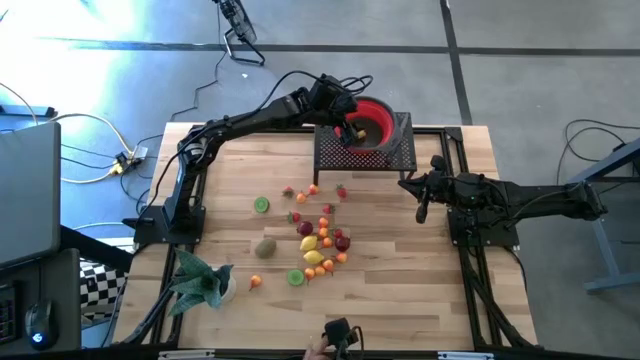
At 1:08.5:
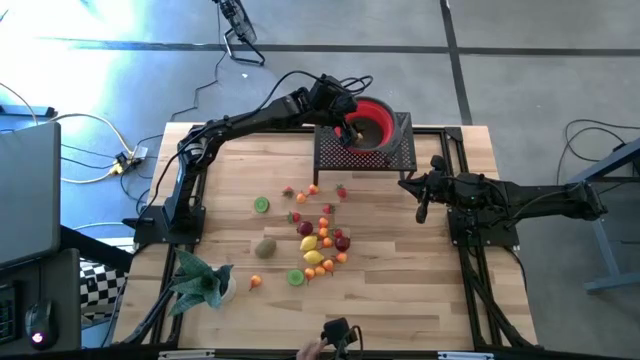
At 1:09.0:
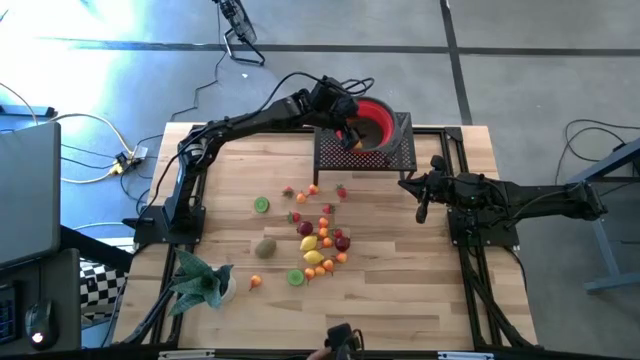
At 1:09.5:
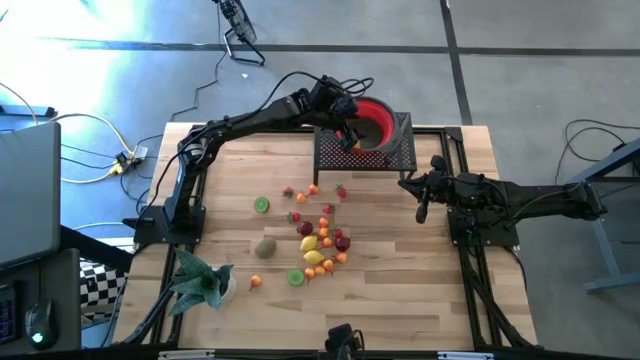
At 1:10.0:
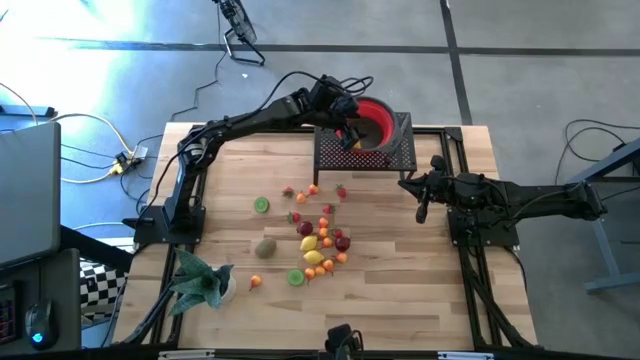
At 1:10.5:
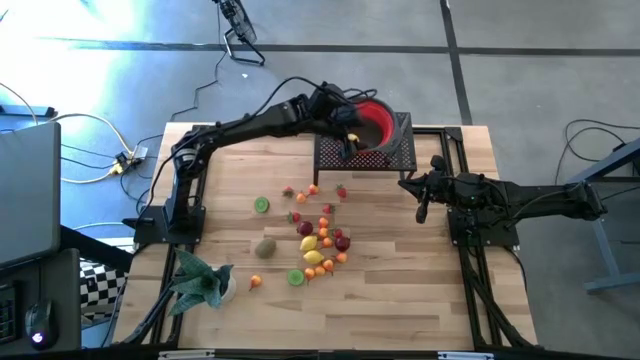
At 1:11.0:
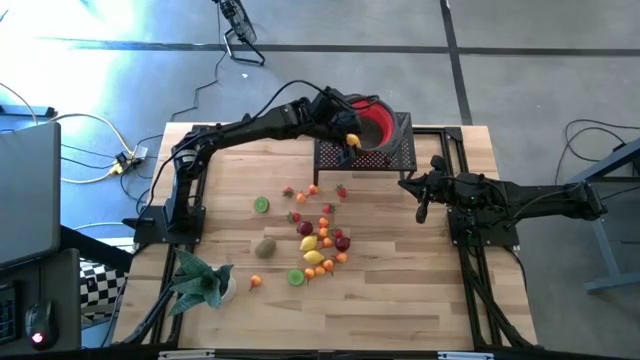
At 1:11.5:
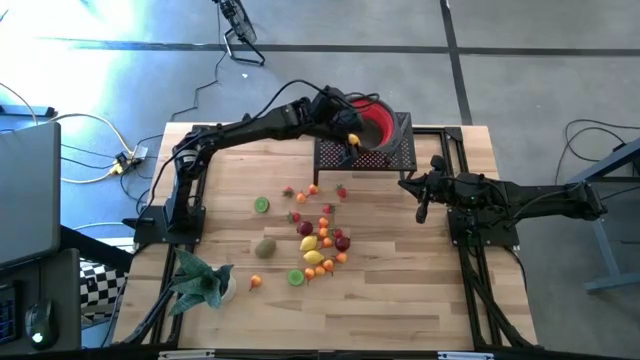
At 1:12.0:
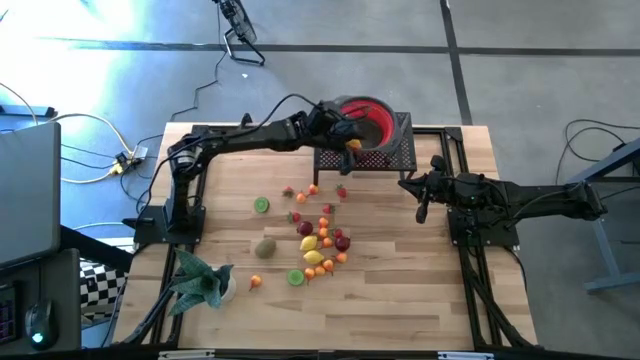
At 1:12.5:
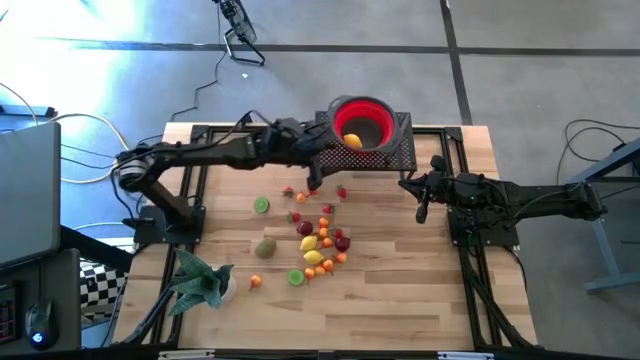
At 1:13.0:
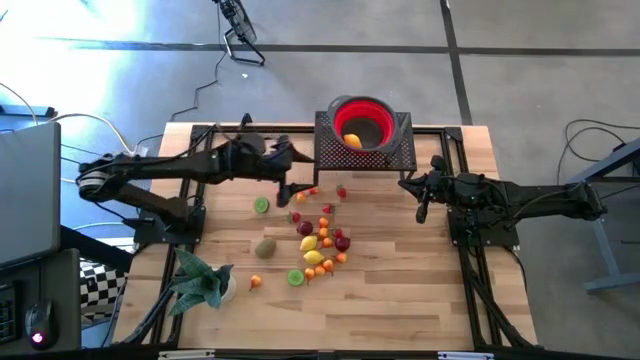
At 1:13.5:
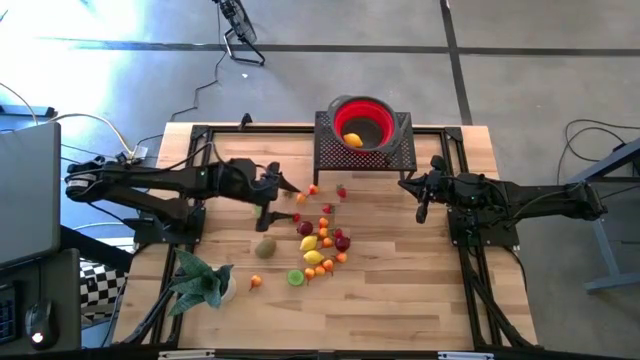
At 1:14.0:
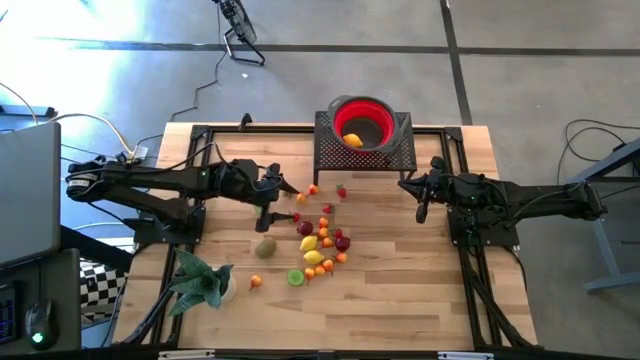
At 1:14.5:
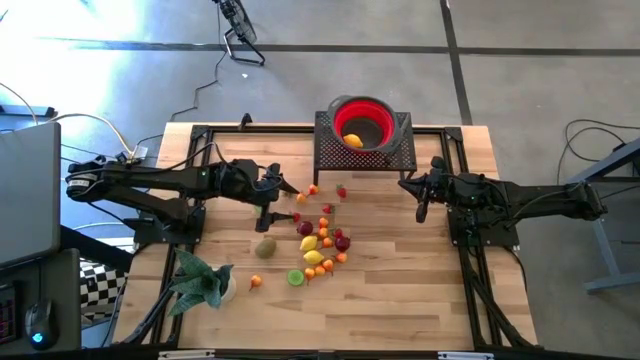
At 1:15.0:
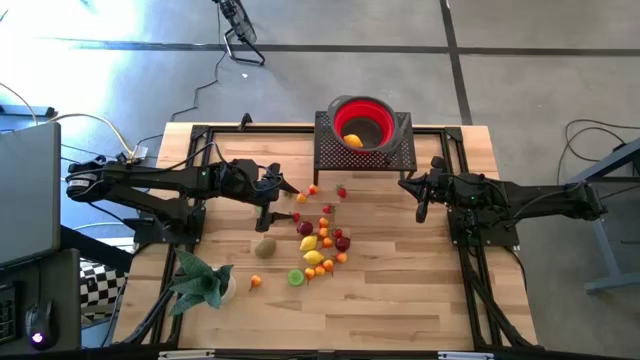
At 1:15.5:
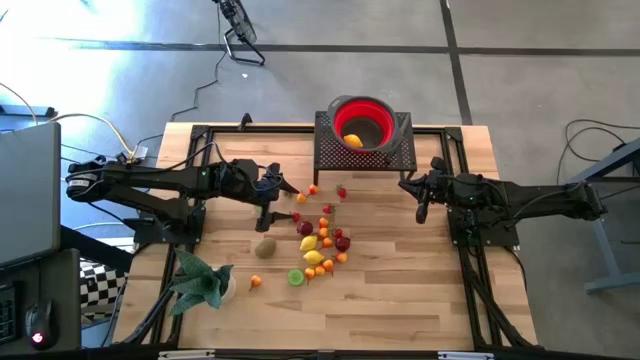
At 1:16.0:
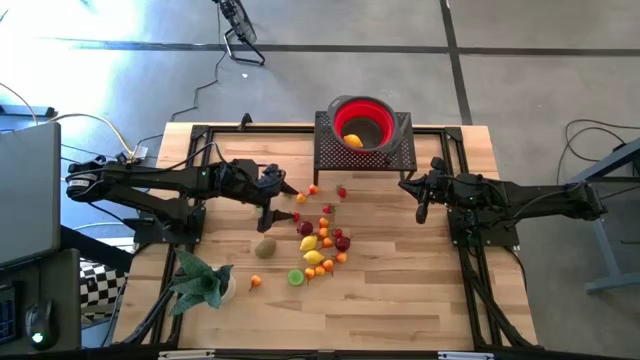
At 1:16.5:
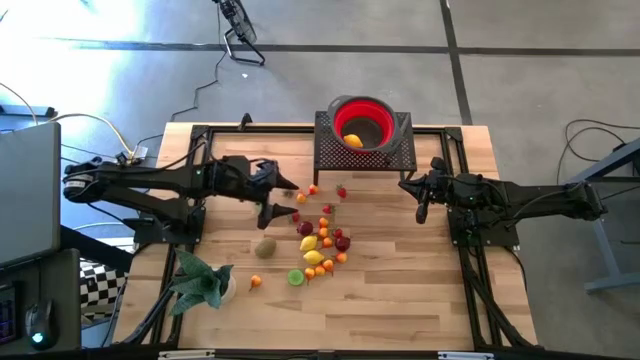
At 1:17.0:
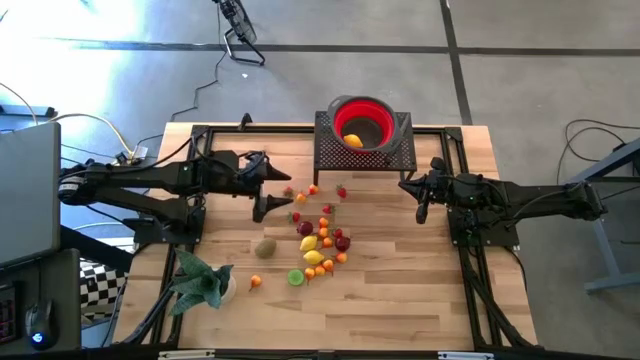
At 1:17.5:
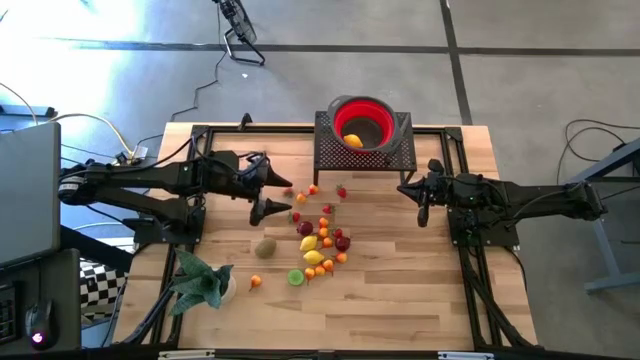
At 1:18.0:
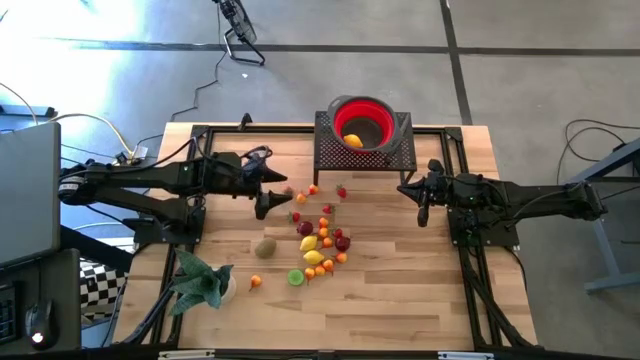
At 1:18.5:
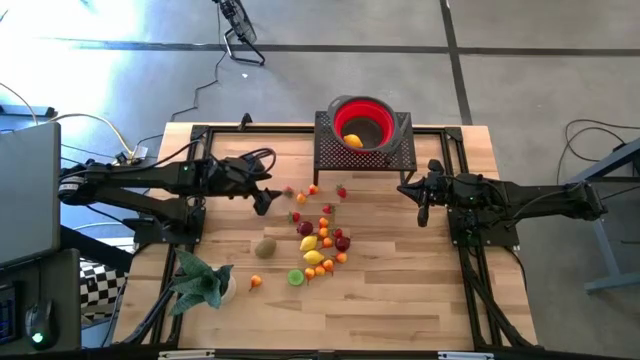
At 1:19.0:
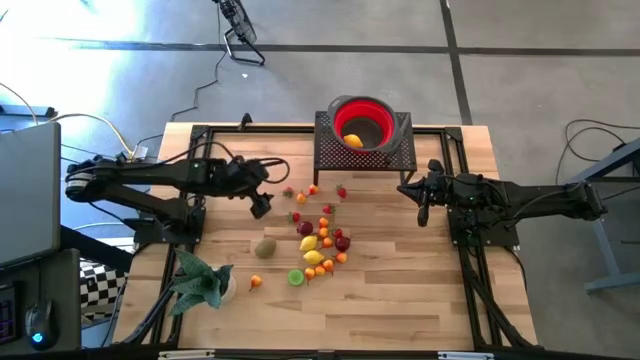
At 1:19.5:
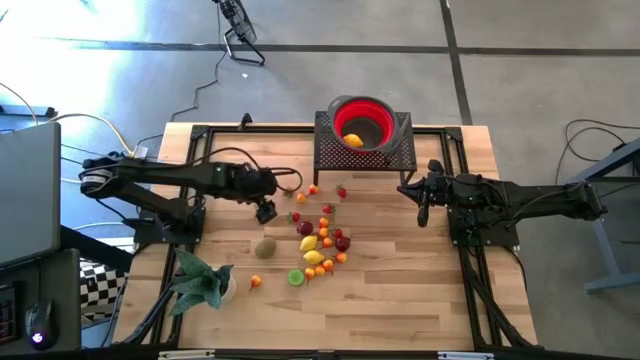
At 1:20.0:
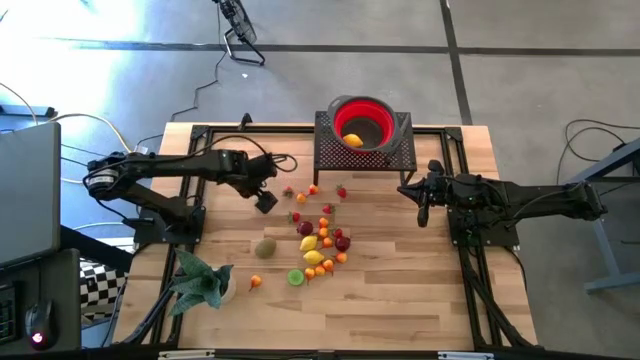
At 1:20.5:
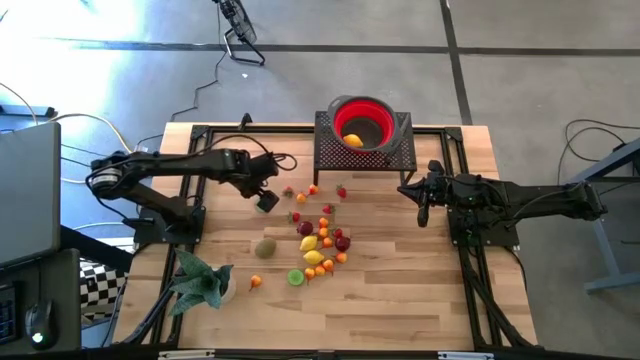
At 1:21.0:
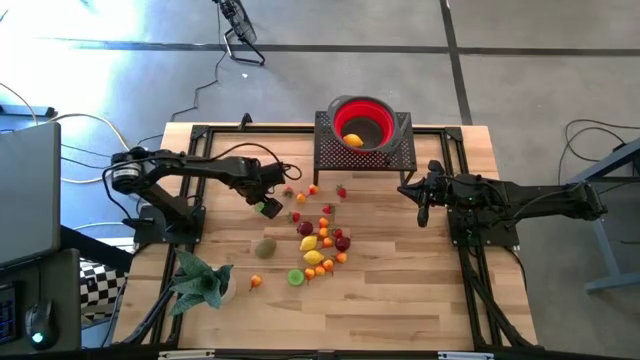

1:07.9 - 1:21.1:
Task: Pick & Place Fruit
Put the half kiwi into the strainer on the shelf

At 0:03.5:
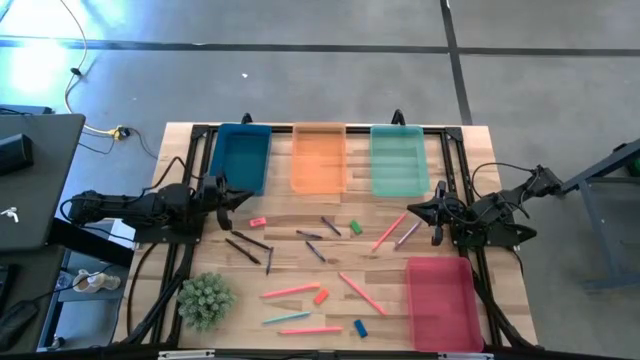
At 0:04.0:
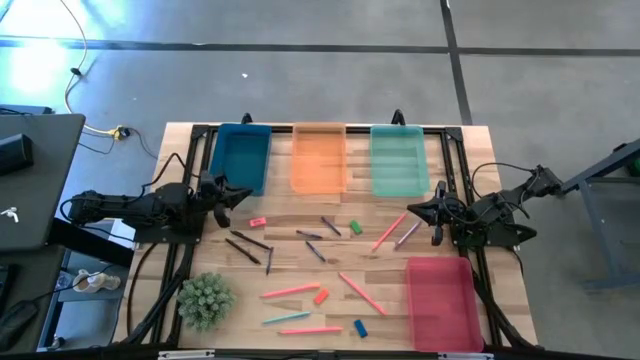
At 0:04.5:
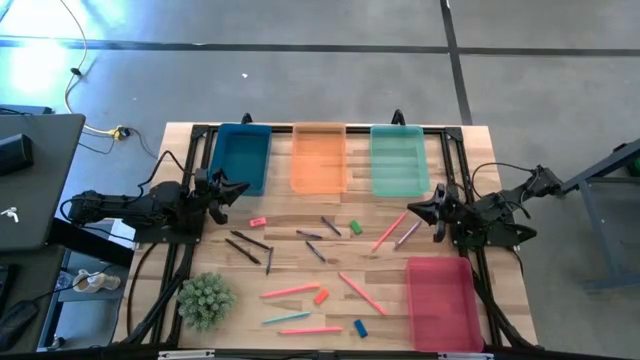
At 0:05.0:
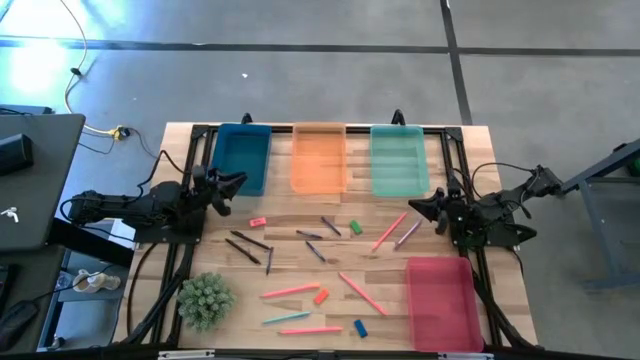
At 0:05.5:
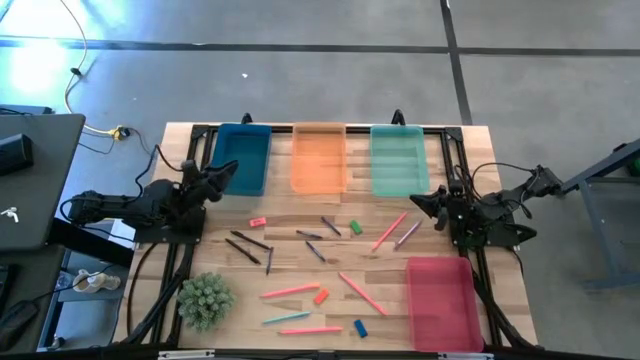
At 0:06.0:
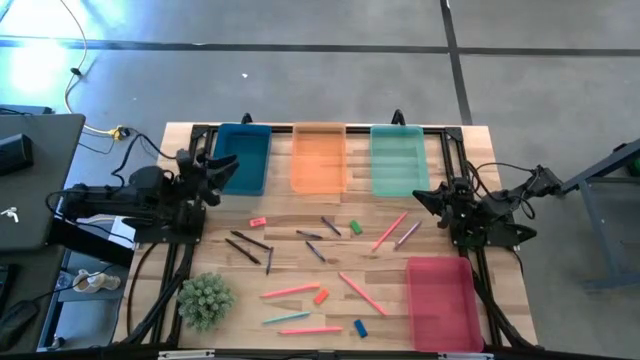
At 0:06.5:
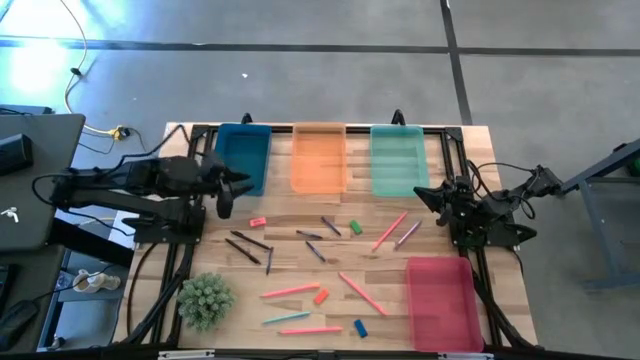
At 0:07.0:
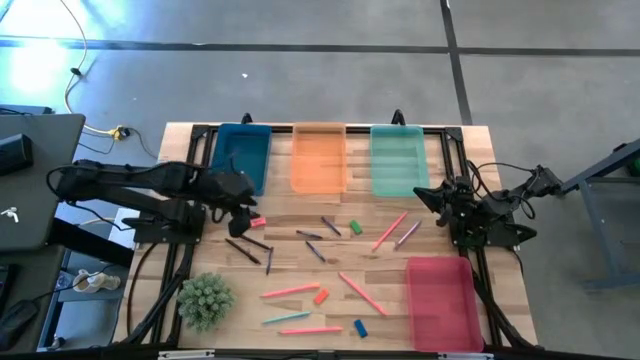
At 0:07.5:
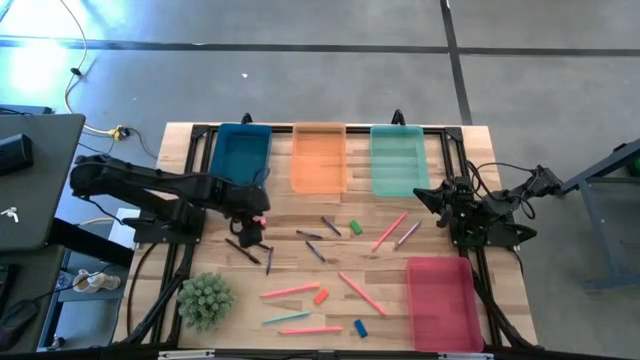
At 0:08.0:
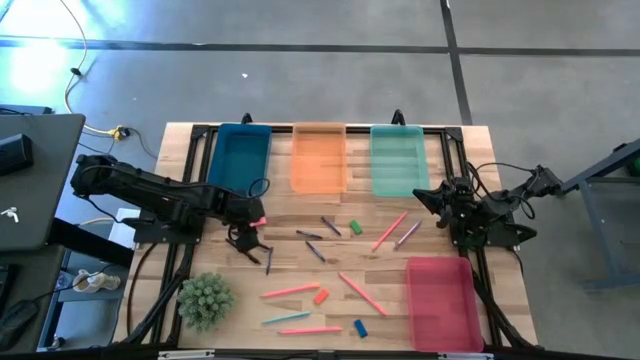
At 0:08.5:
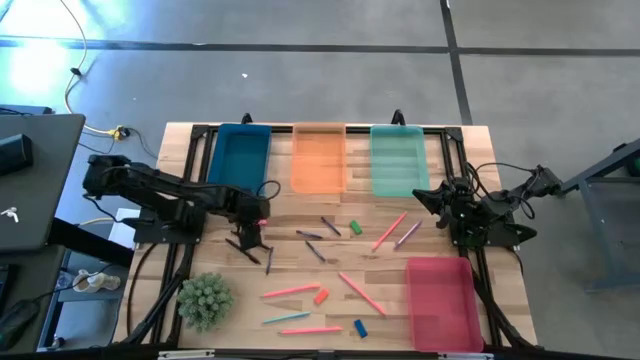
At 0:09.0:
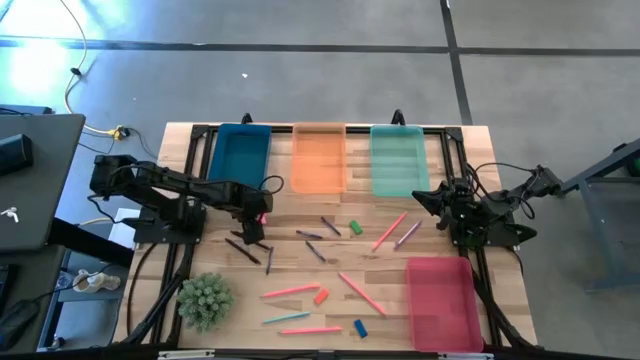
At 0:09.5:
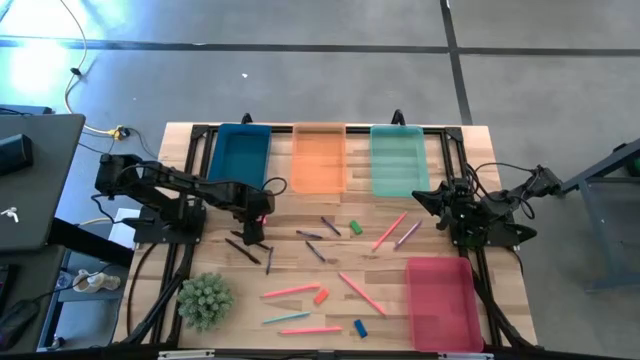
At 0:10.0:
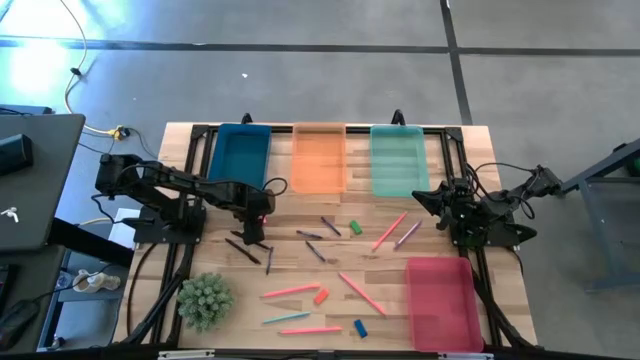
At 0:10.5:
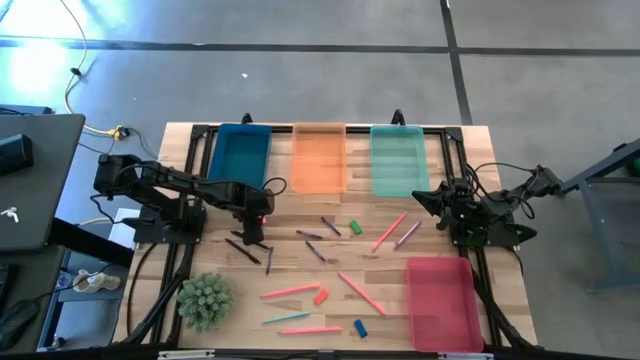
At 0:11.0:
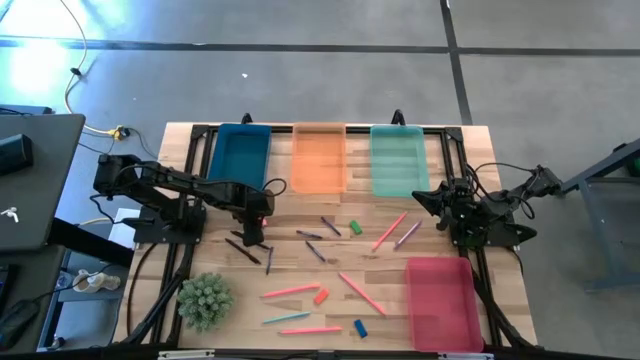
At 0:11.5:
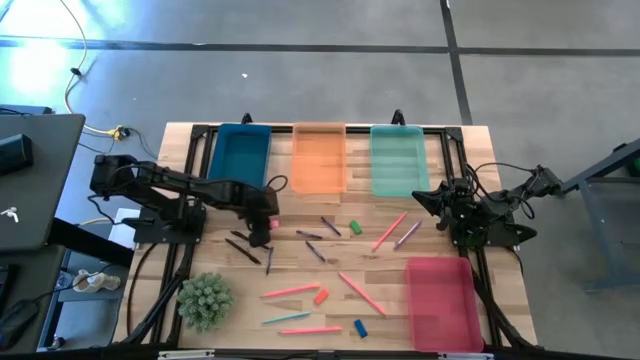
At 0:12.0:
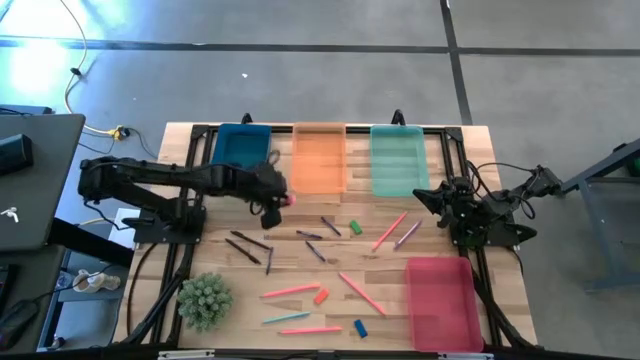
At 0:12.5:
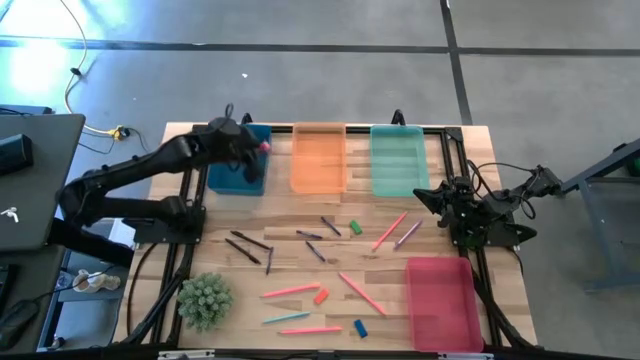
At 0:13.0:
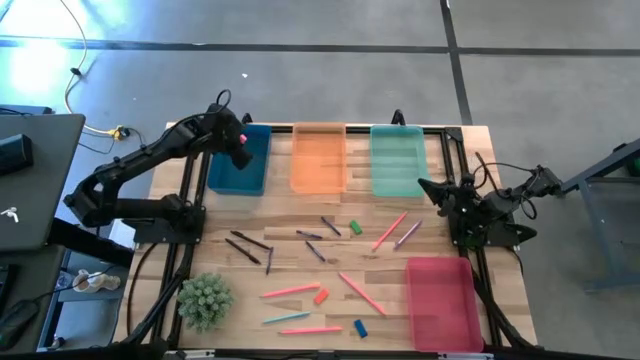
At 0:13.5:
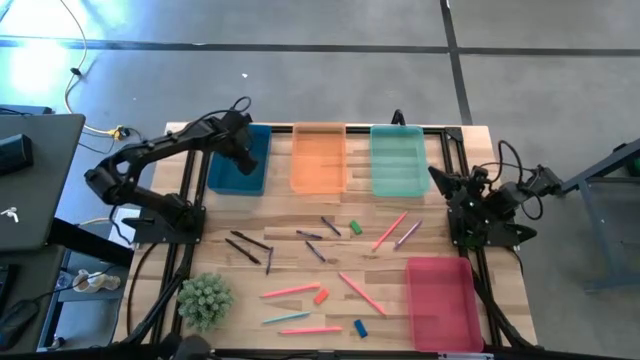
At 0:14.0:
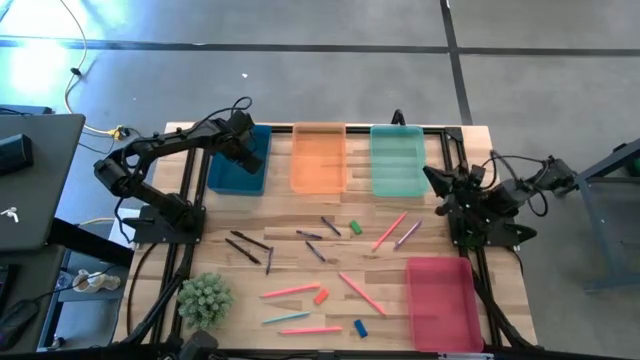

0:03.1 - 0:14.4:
Task: Sort crayons/erasers/pens/pencils in bins
Put the pink eraser into the dark blue bin
